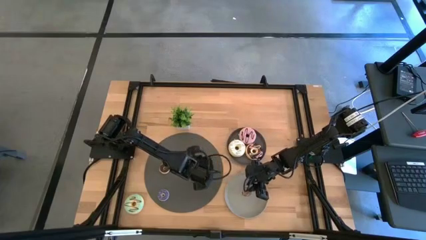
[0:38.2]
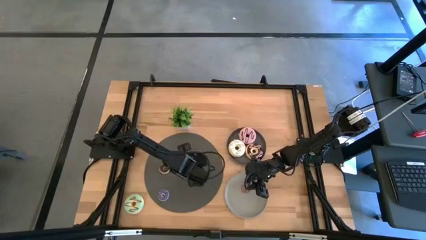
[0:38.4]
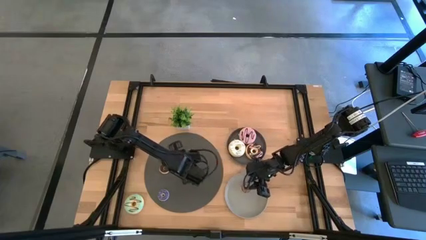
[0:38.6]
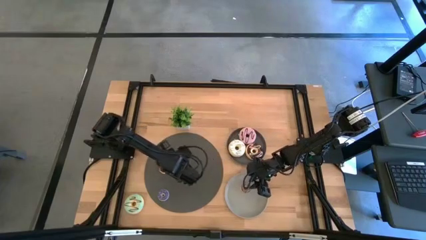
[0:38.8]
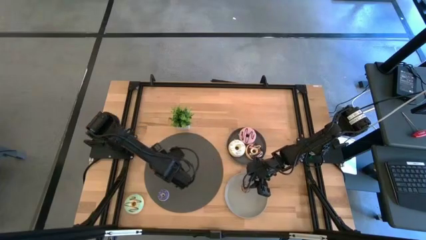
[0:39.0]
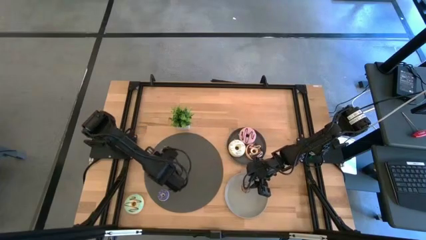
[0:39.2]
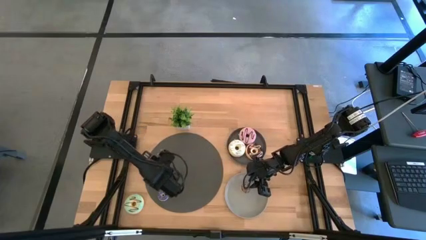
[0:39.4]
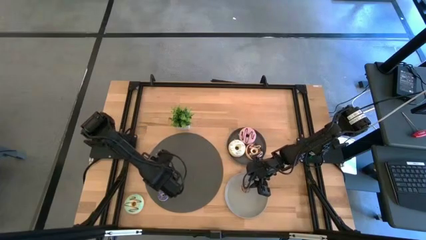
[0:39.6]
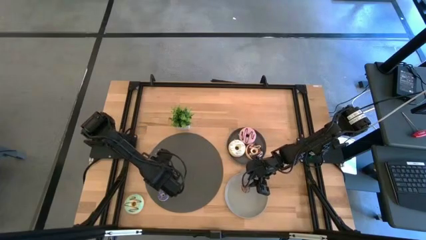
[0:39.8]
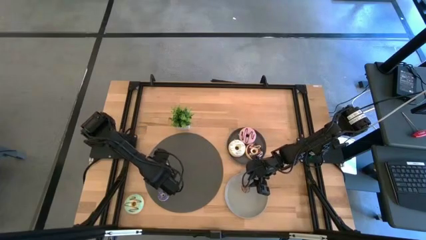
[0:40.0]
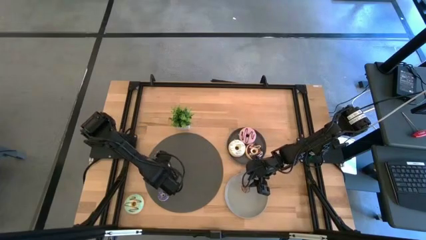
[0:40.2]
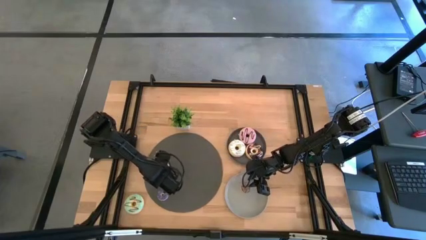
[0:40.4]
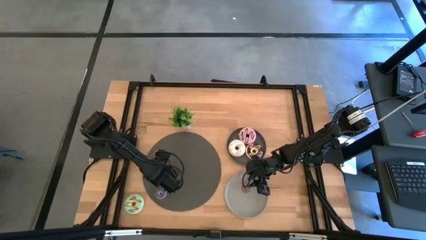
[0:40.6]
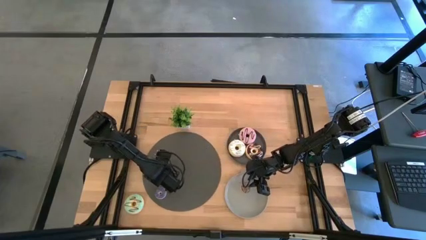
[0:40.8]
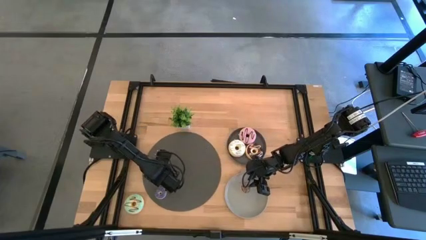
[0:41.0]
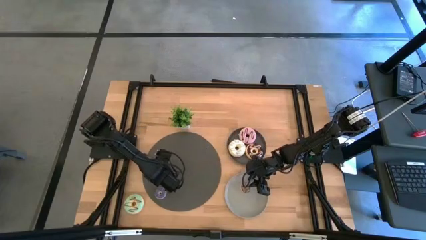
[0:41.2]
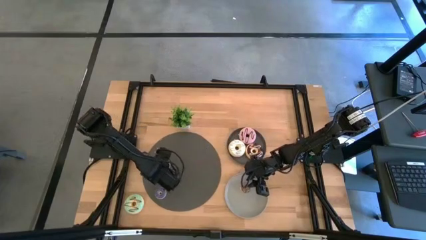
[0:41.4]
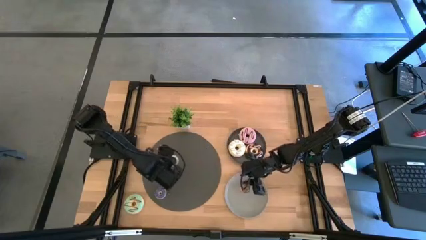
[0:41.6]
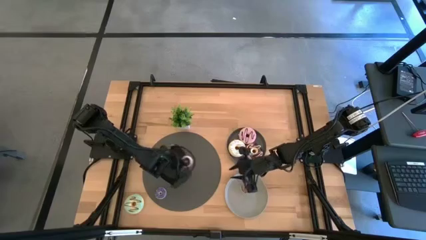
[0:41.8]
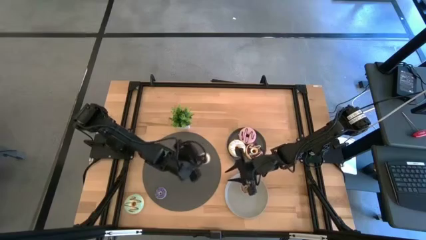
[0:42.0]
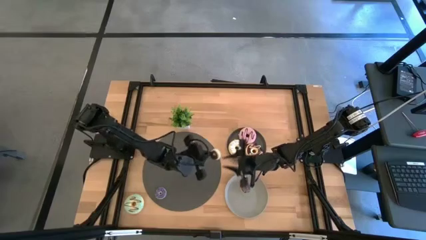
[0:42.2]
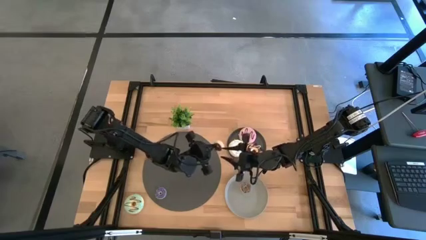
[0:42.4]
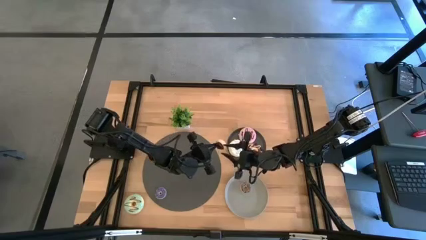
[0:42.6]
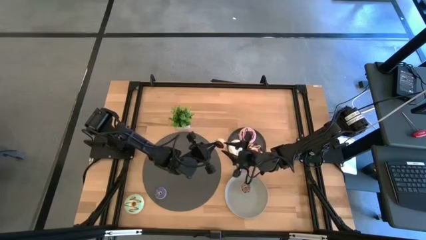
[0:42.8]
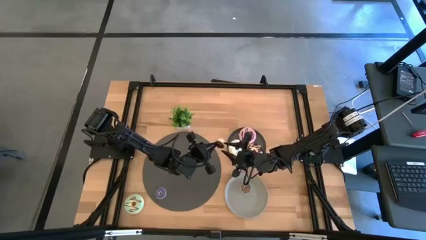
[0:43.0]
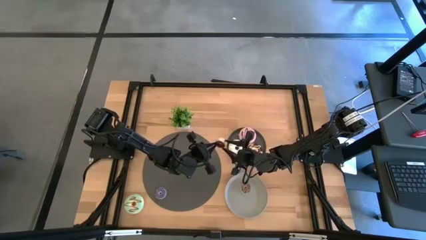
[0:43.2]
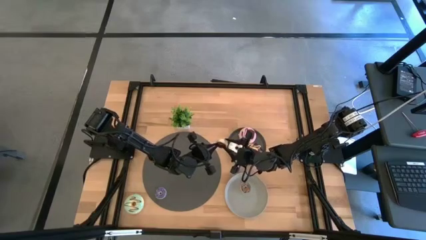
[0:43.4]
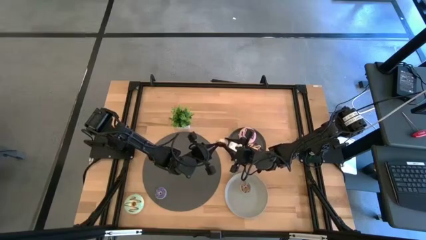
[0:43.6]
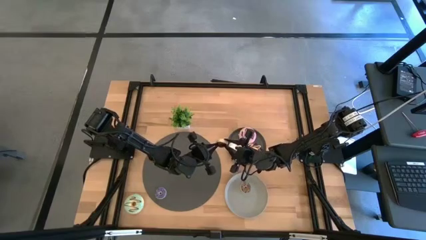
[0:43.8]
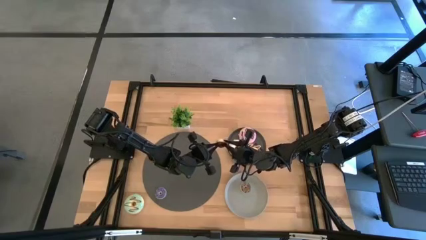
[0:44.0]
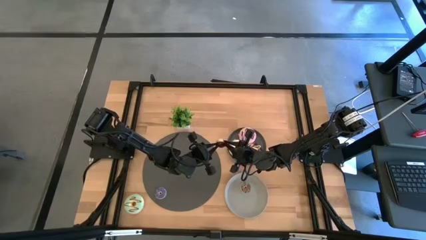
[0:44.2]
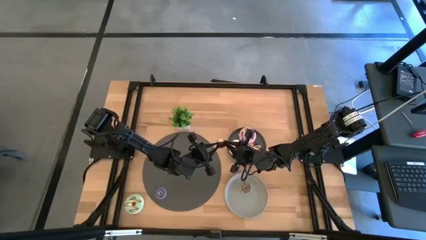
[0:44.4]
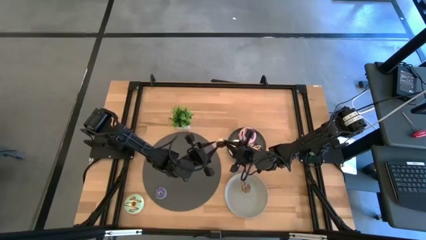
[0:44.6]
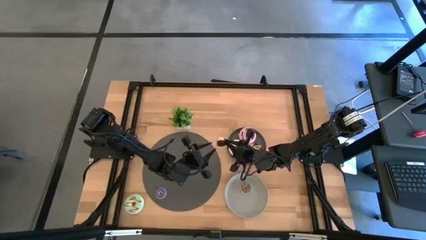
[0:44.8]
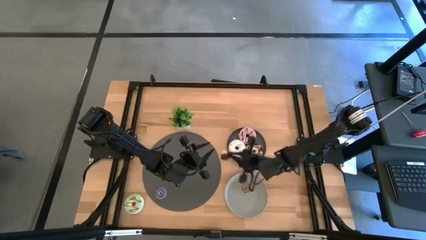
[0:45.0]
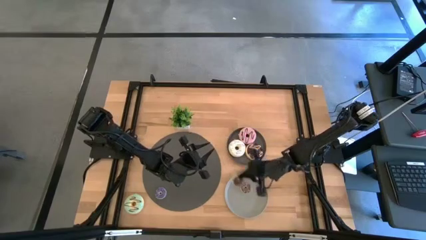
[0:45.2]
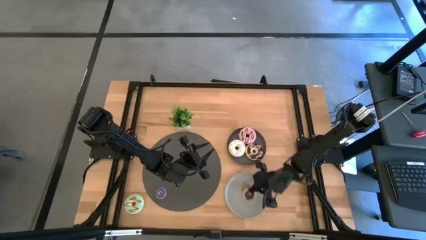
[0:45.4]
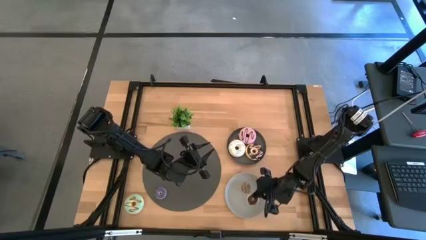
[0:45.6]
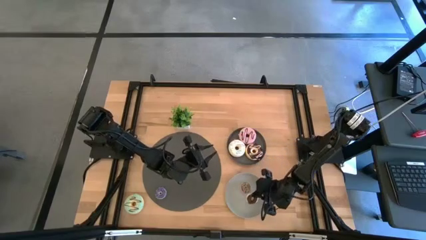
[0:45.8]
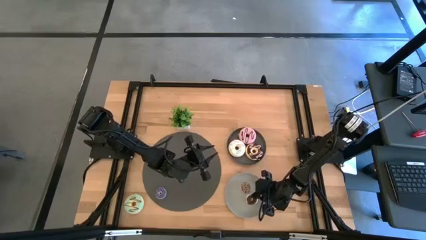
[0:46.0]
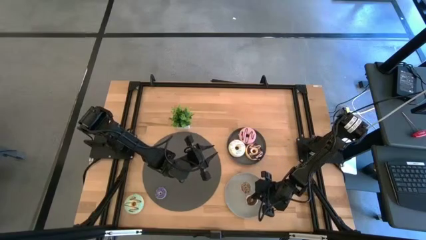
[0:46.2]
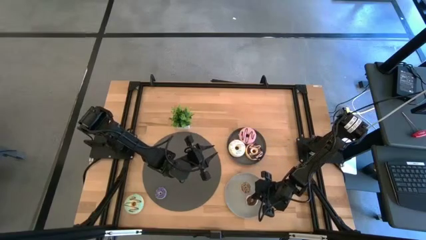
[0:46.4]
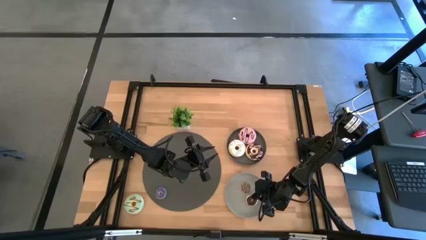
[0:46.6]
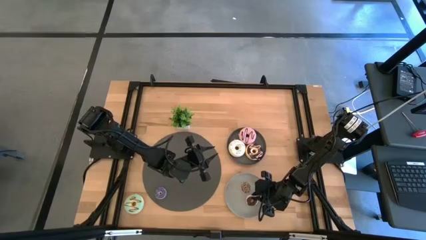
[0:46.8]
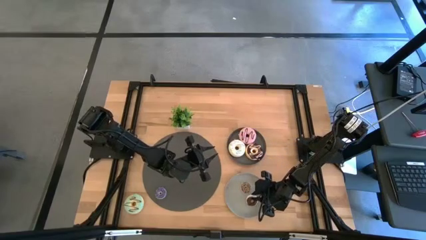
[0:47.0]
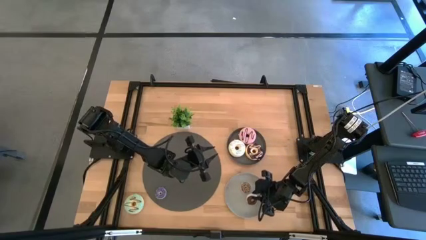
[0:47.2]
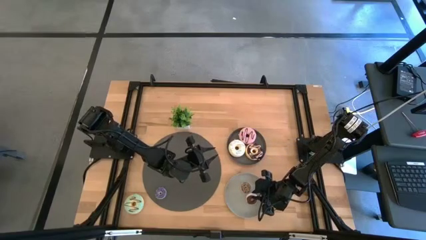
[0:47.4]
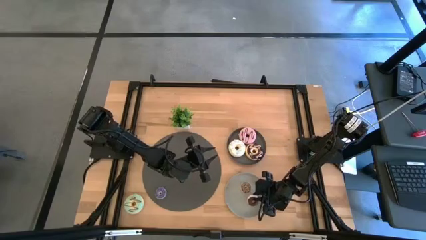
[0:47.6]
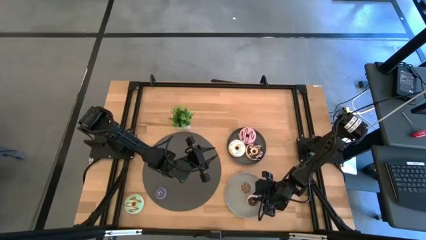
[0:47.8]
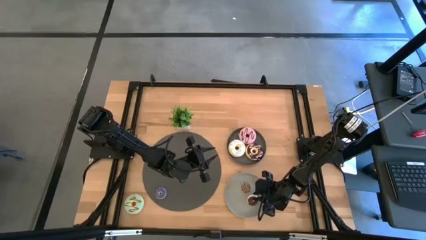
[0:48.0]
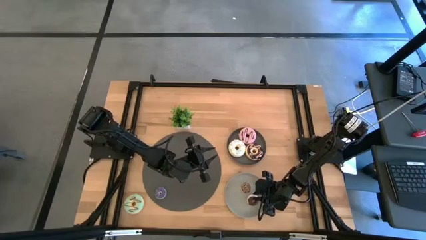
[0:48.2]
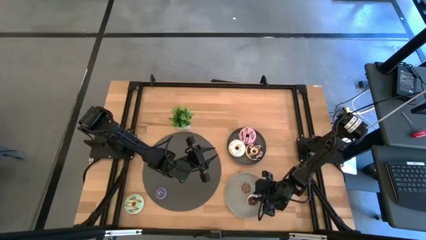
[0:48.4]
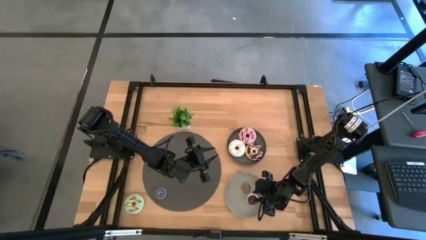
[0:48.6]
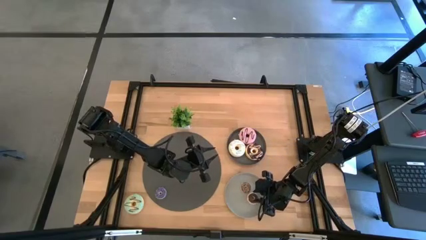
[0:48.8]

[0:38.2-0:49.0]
Task: Pick & Place donuts
Put the small black donut on the gray plate

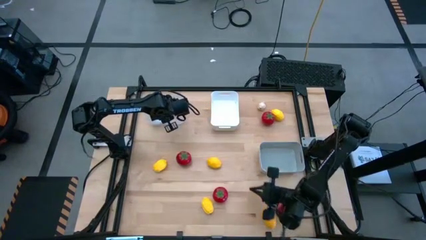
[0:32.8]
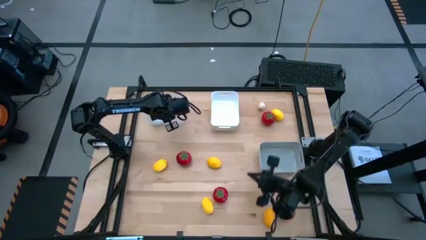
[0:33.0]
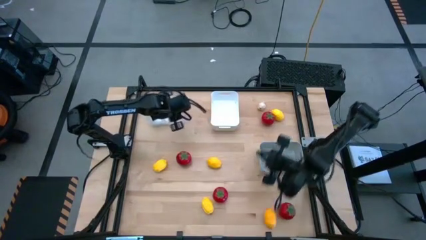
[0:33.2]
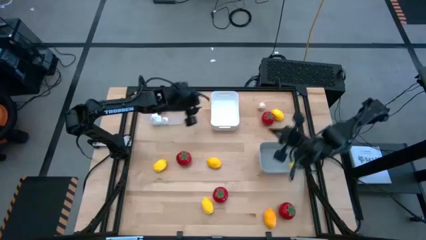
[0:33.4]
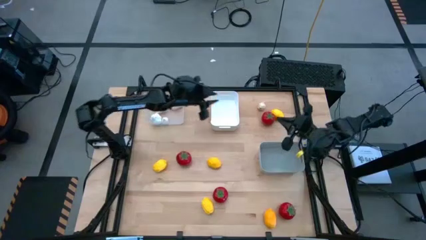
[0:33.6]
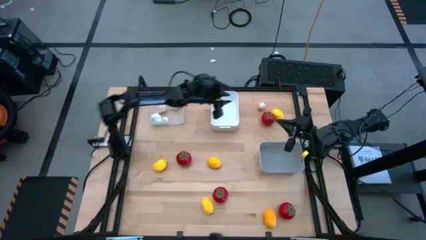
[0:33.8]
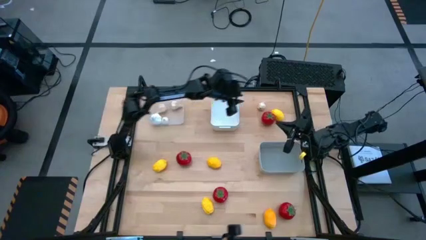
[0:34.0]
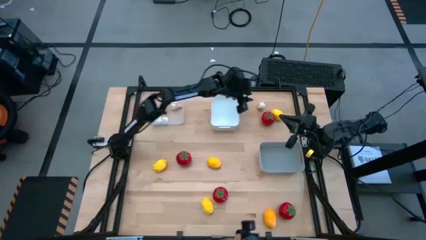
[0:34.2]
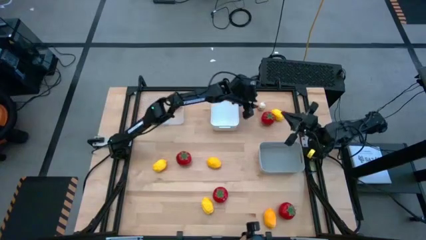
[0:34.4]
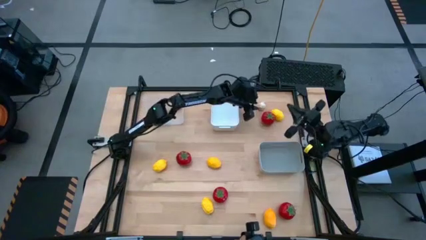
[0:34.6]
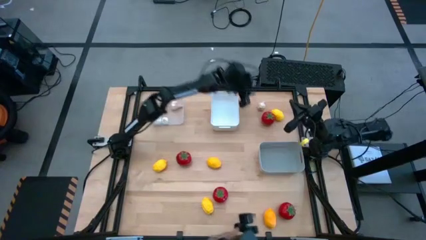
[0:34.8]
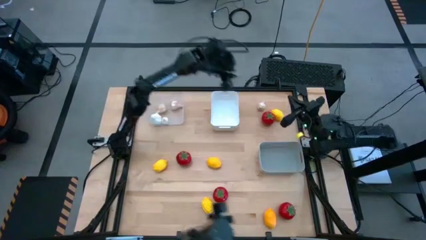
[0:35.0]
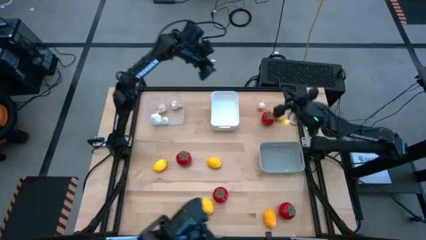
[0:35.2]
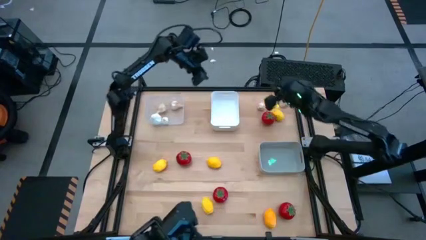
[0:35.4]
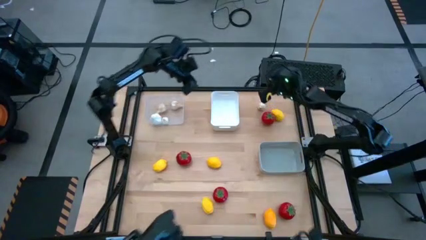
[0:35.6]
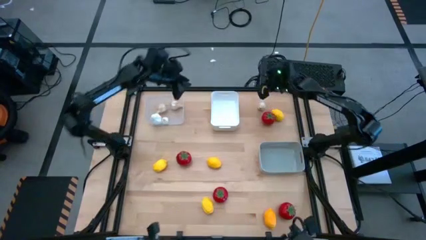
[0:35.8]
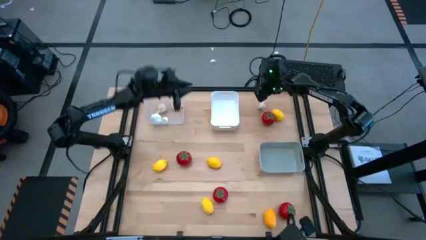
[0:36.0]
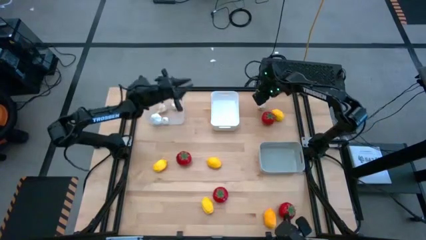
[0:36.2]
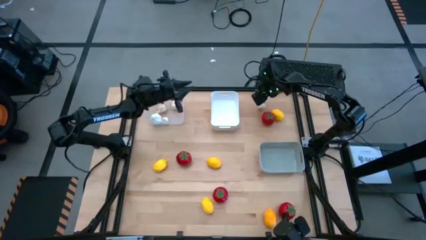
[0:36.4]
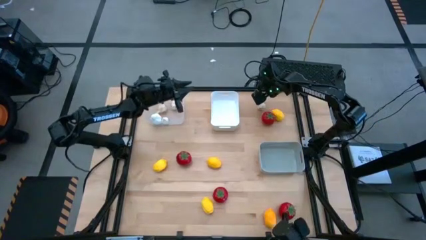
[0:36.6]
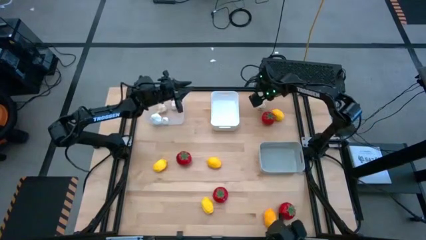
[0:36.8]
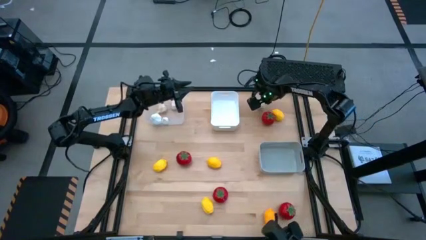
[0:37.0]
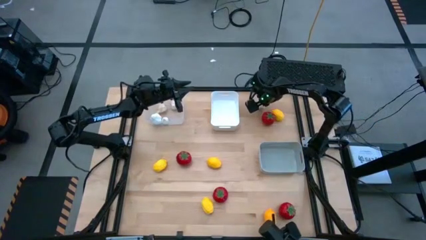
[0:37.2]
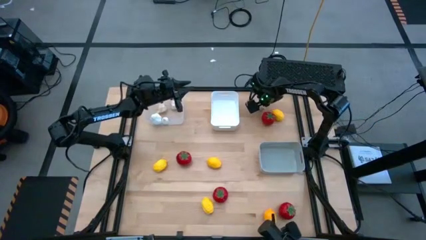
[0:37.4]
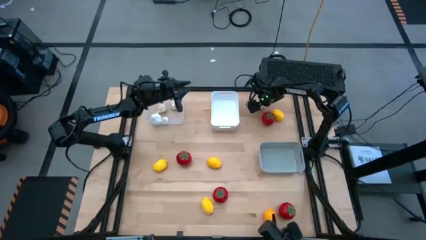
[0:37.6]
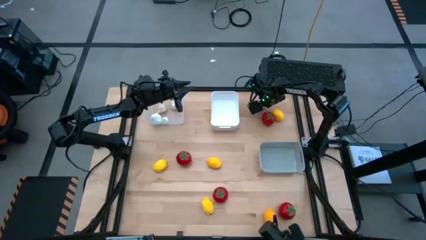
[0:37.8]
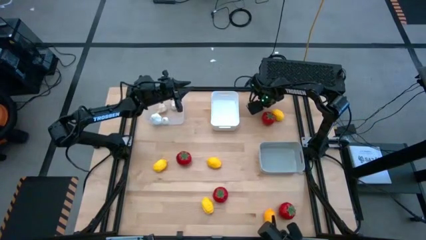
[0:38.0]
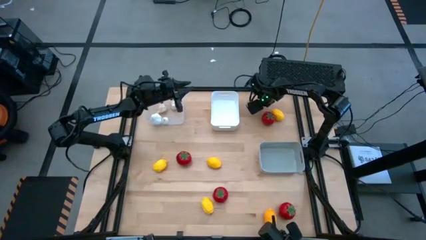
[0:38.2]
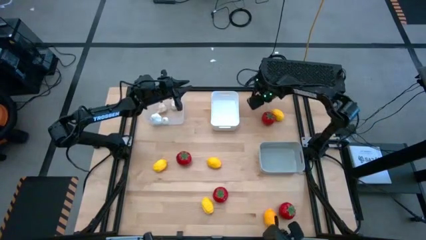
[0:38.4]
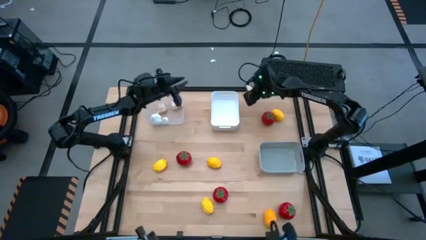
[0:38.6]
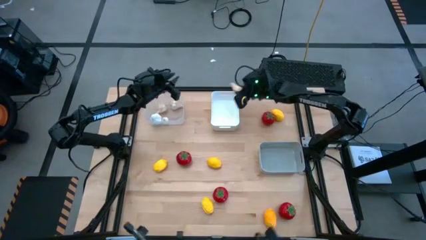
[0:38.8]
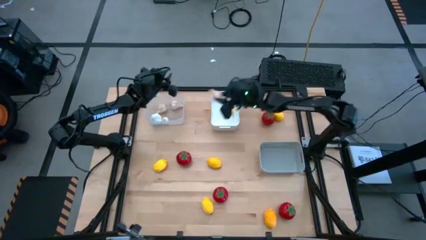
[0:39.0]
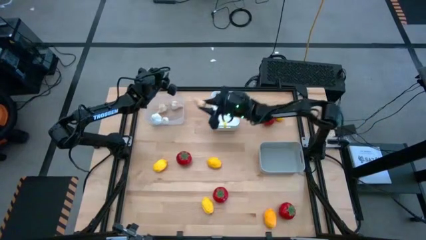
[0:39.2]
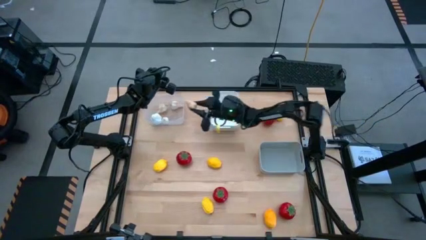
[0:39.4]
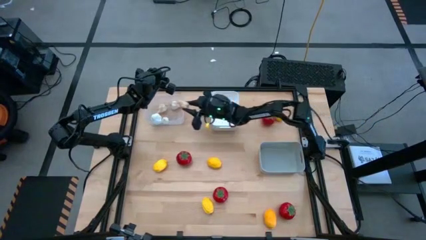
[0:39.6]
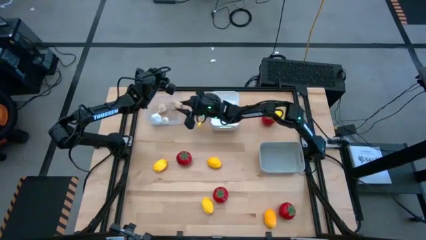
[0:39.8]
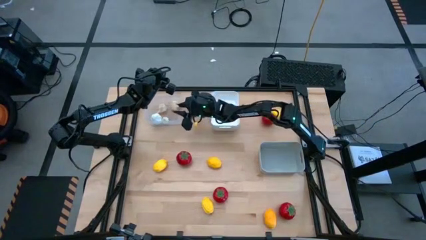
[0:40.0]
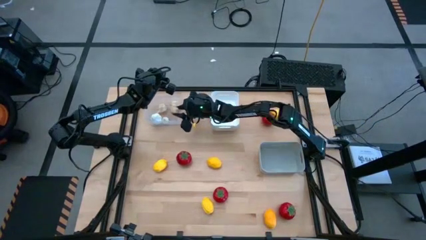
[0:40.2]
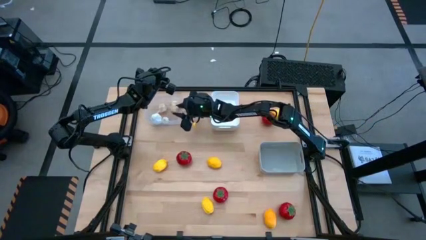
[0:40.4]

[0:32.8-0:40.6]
Task: Sort produce into baskets
Put the garlic into the transparent bin
